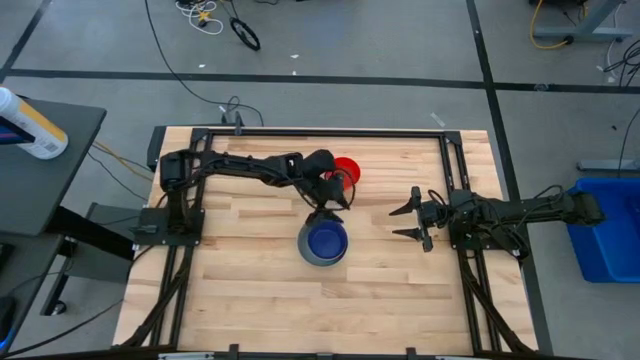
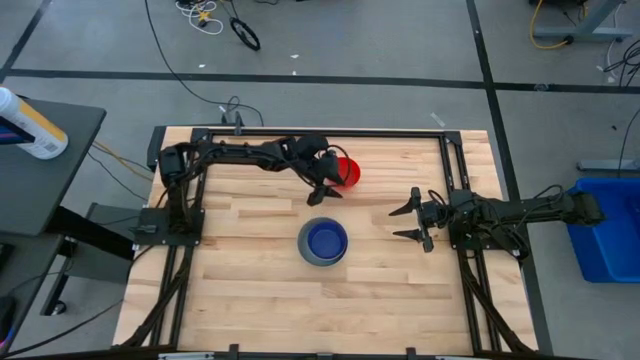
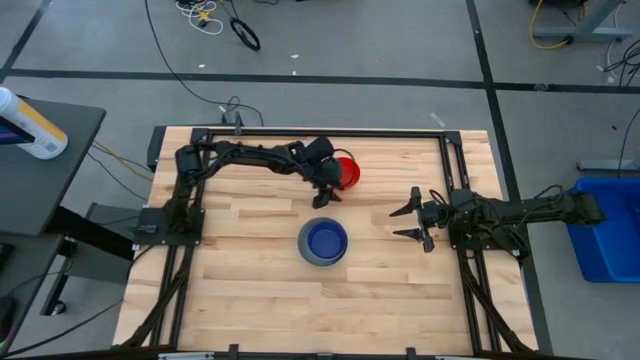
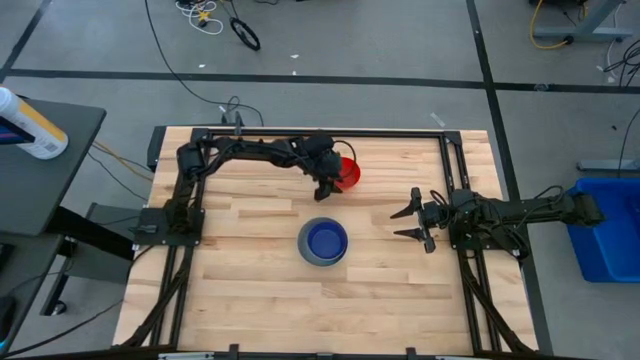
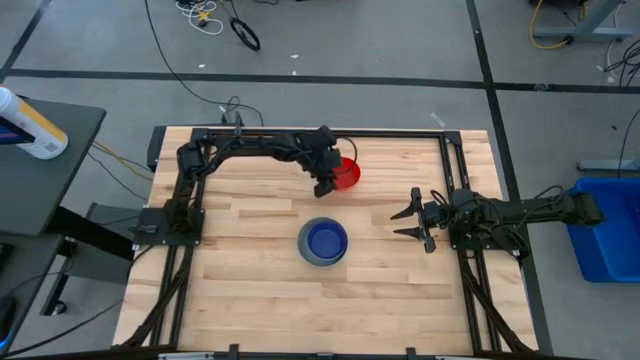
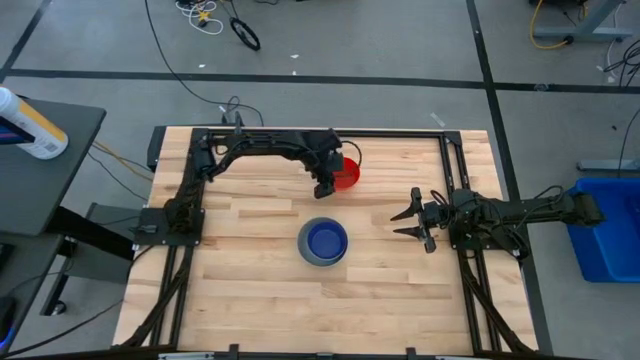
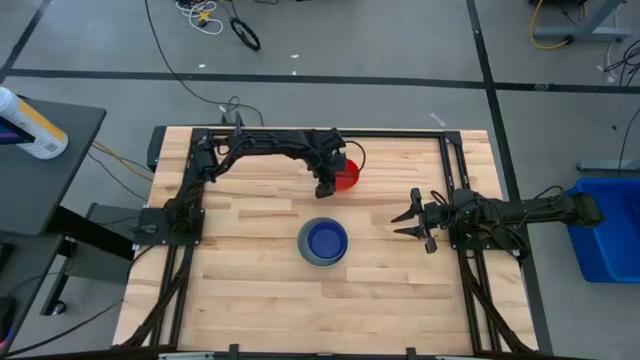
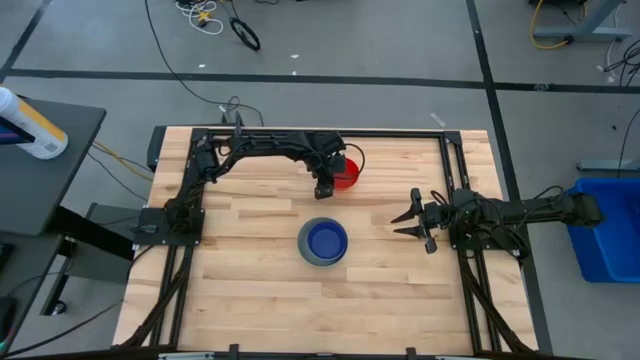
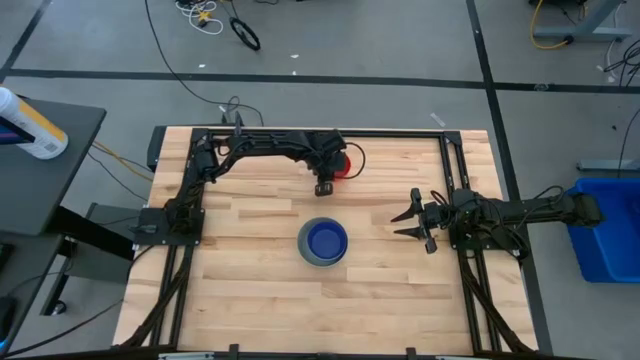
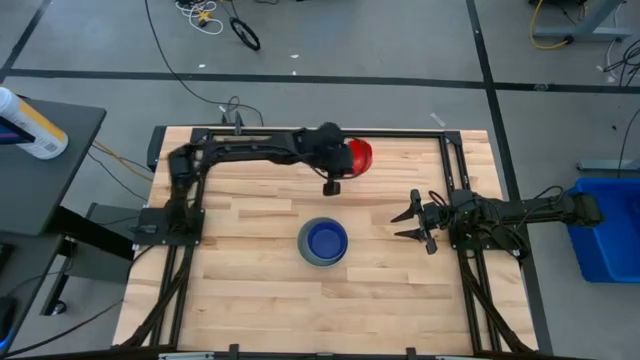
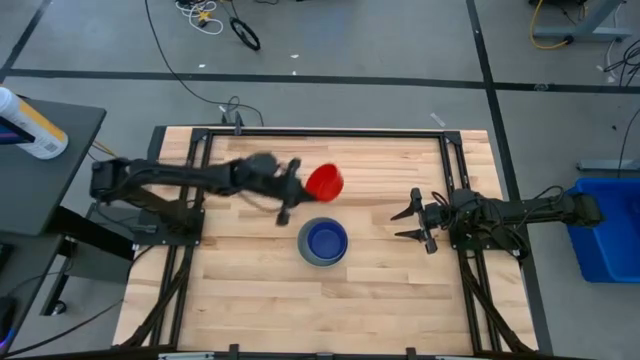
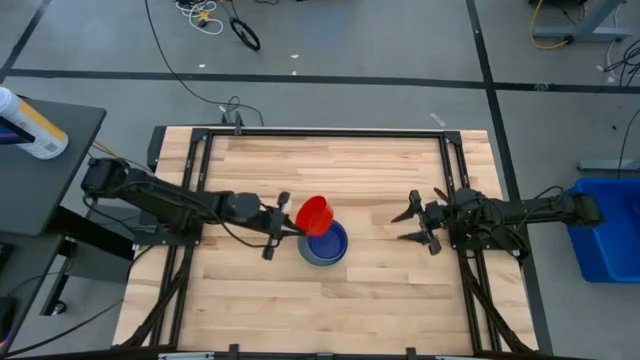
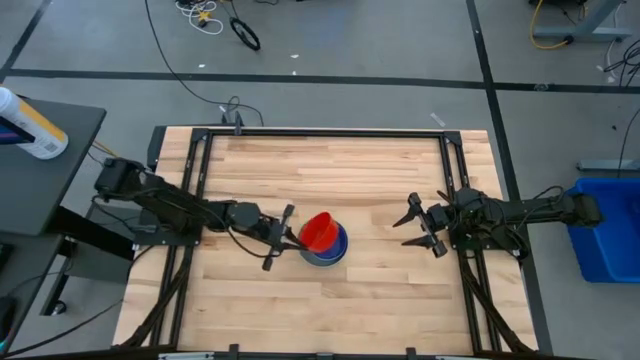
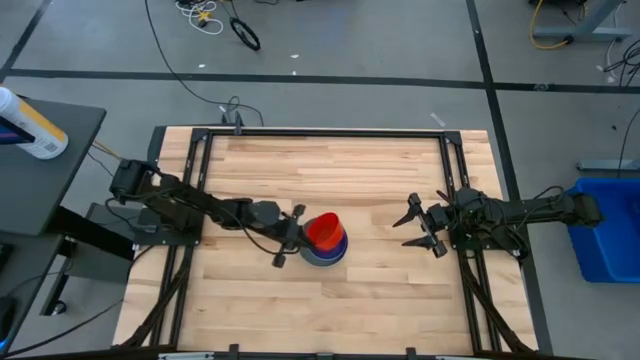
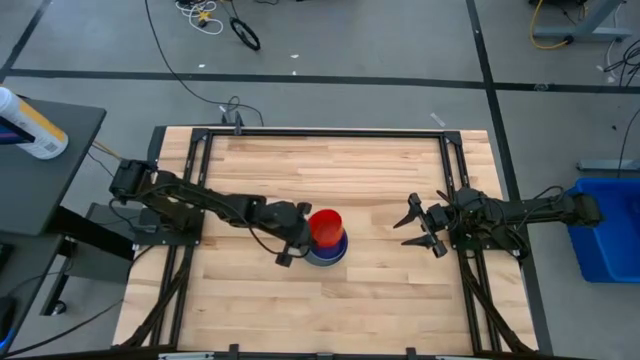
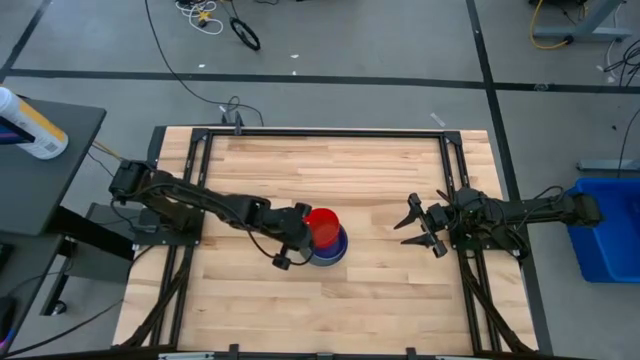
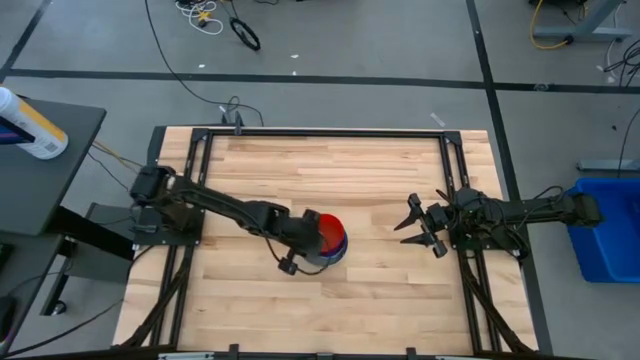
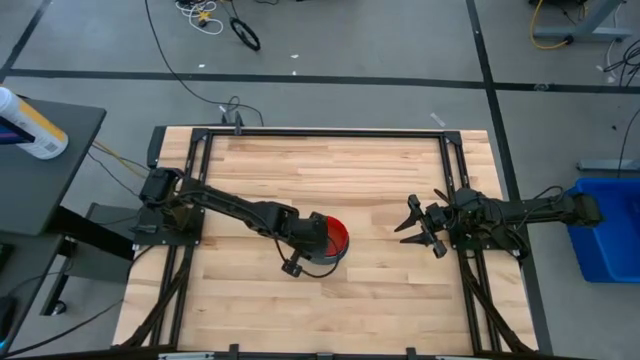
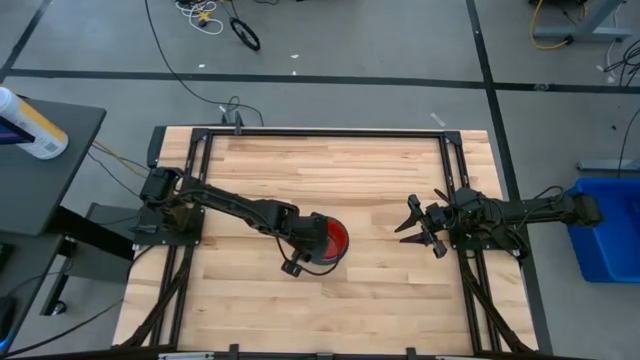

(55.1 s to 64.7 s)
Stack the red bowl on the dark blue bowl

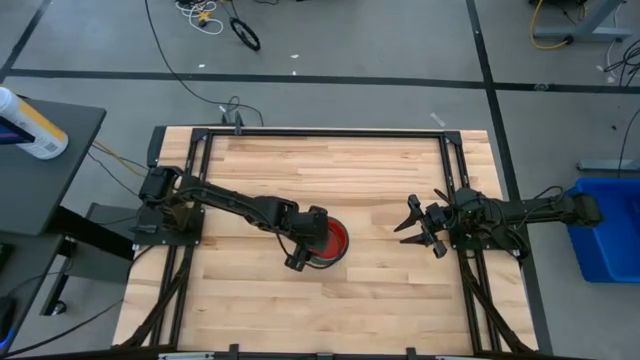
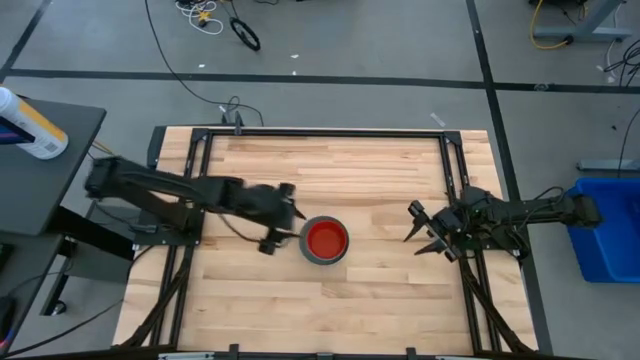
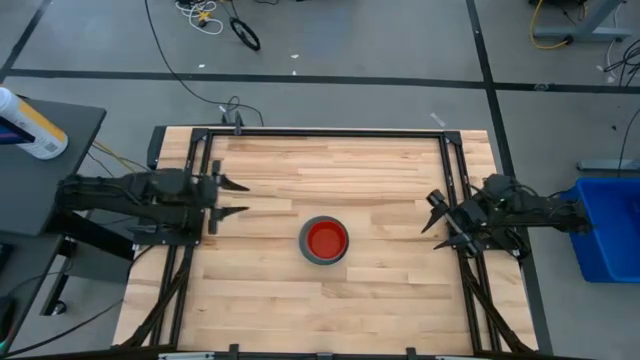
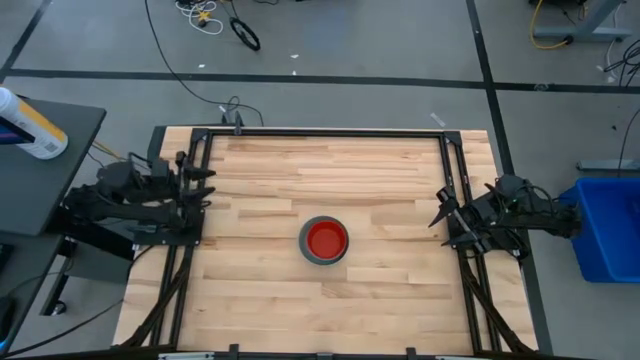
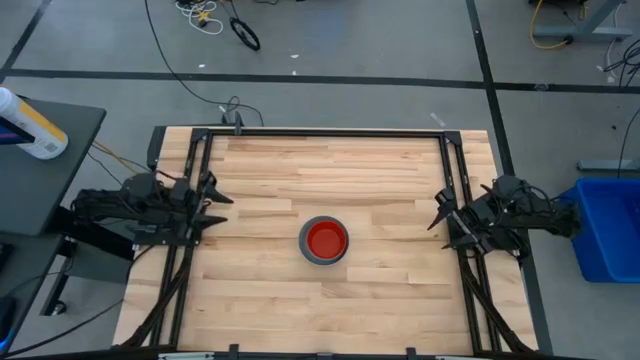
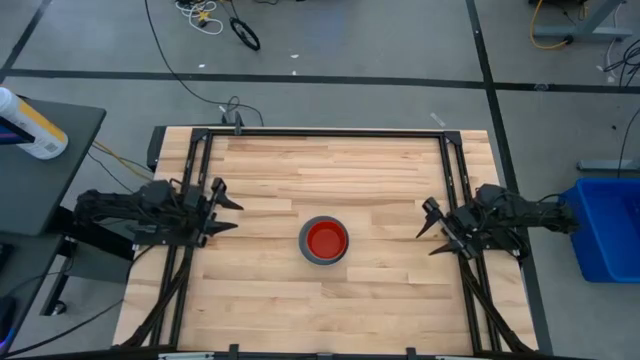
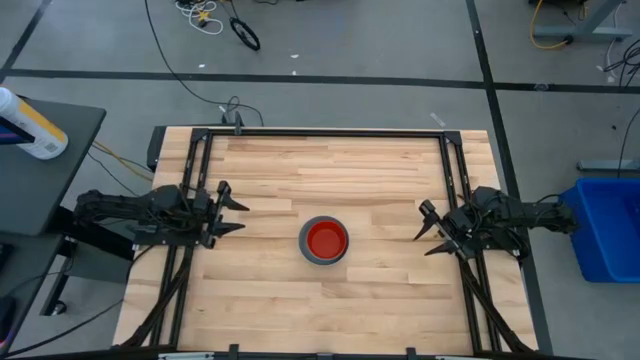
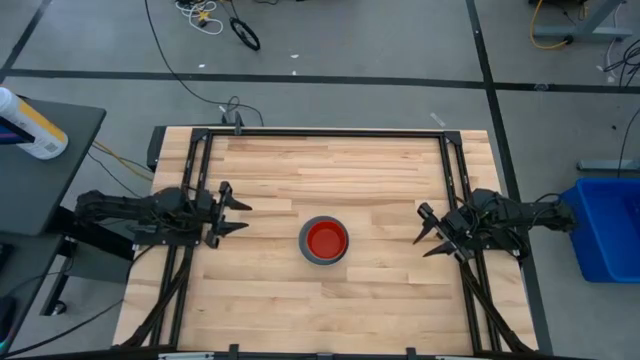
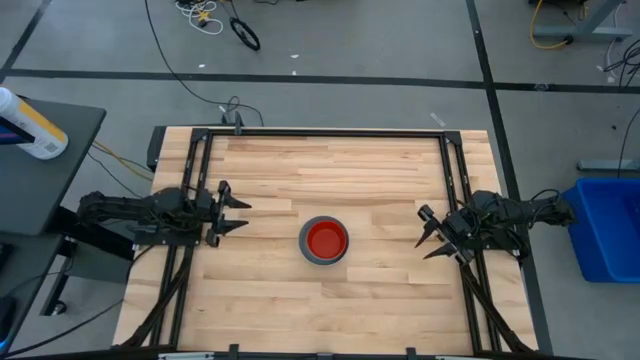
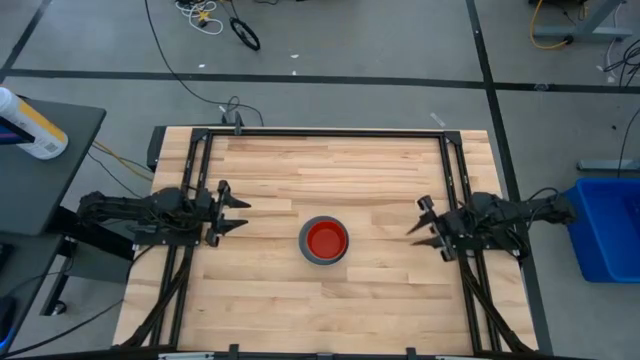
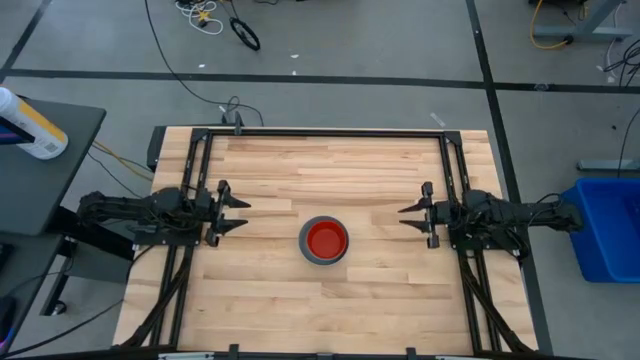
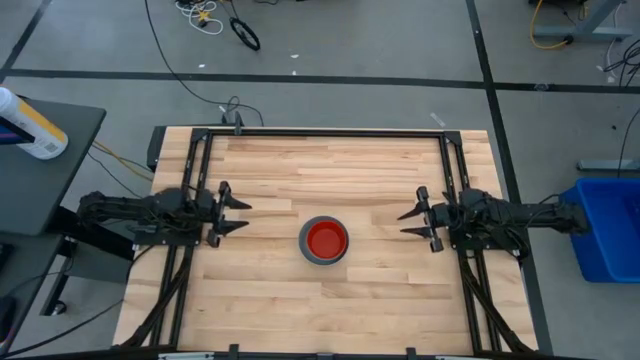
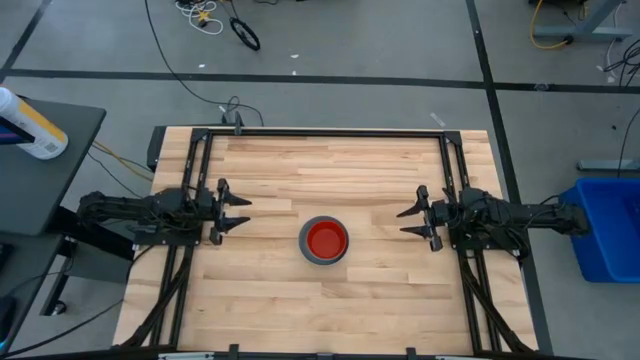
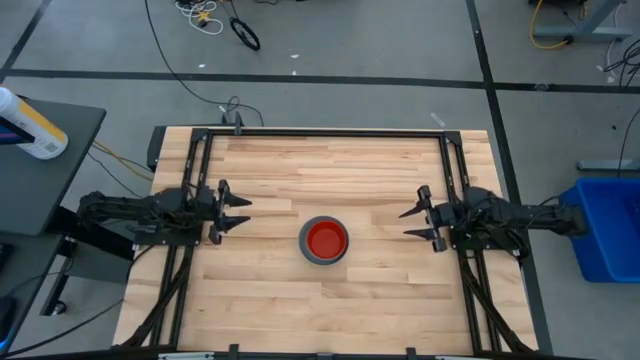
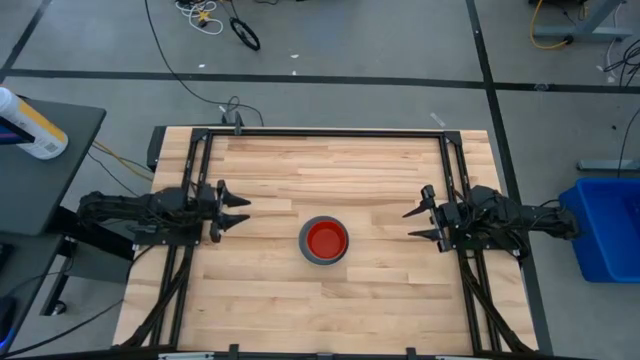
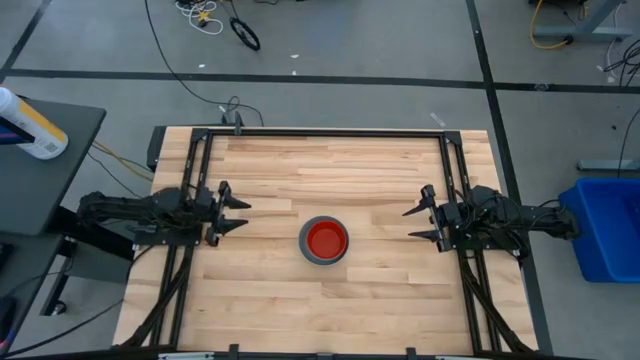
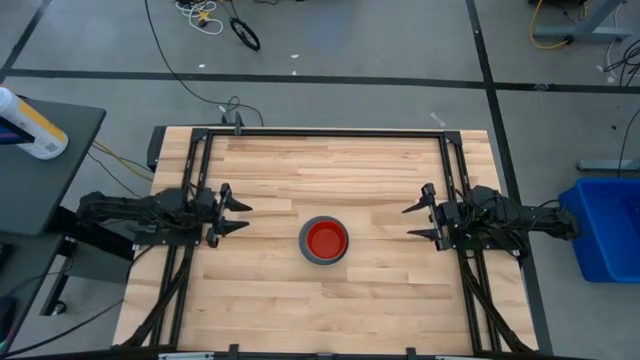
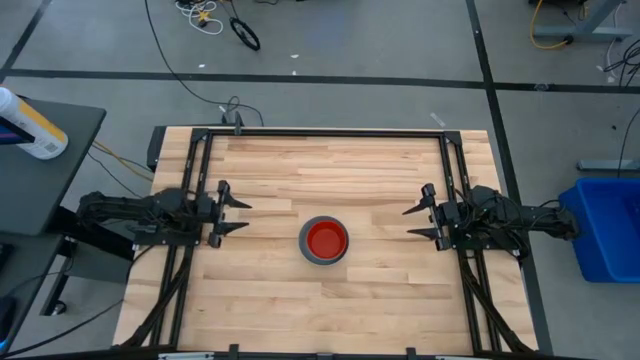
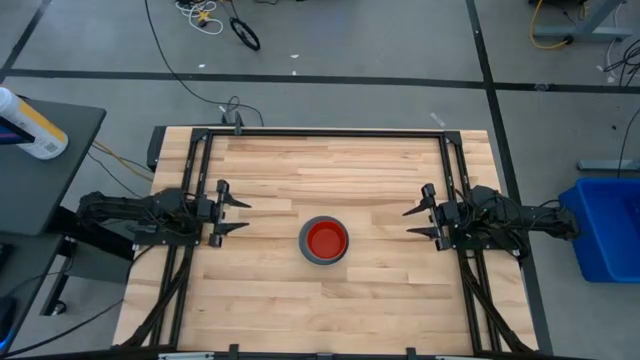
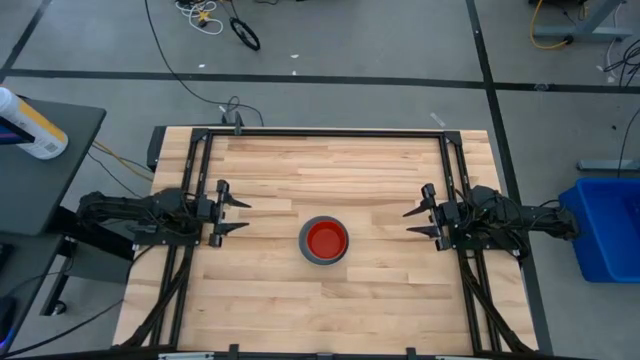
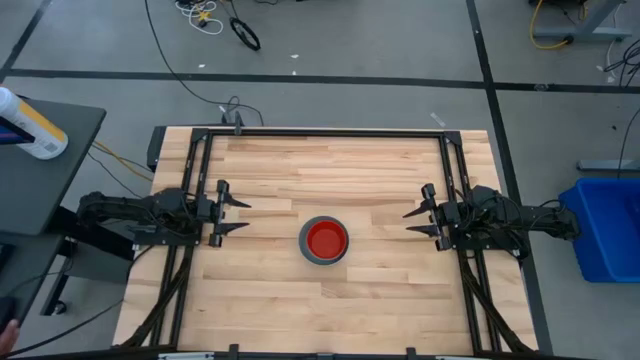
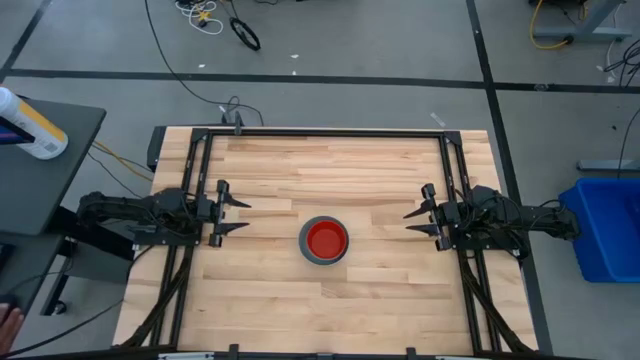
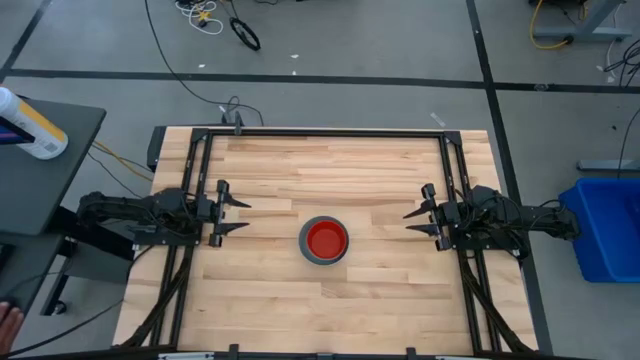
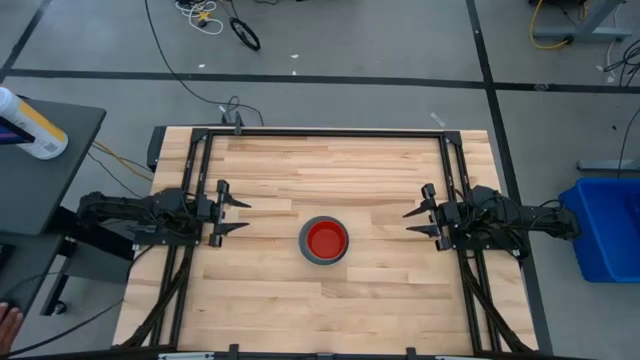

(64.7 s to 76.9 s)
Return to Home Position
